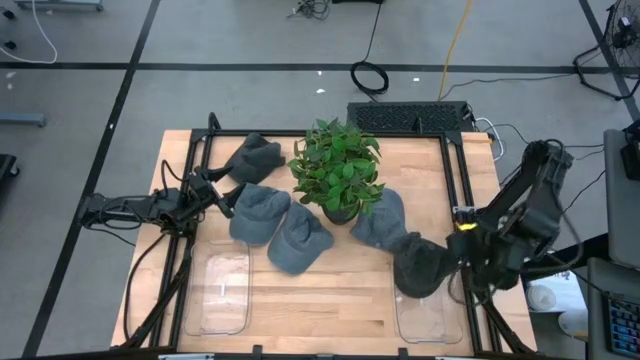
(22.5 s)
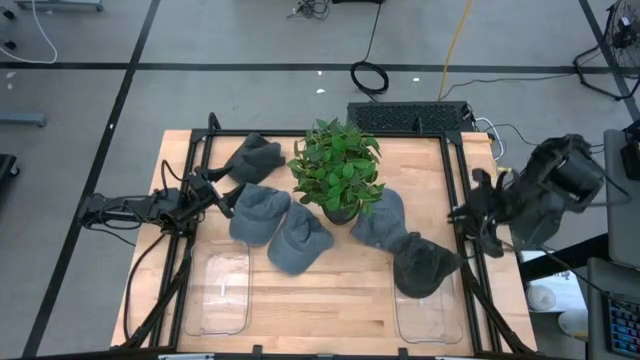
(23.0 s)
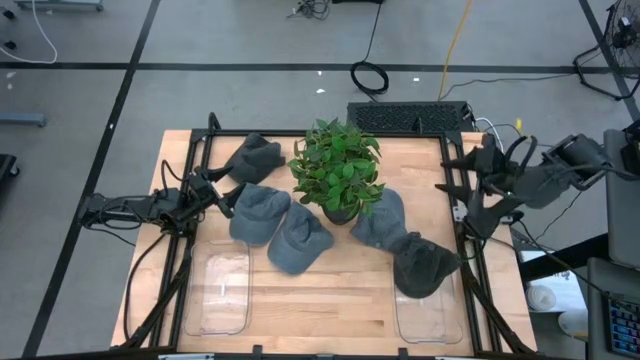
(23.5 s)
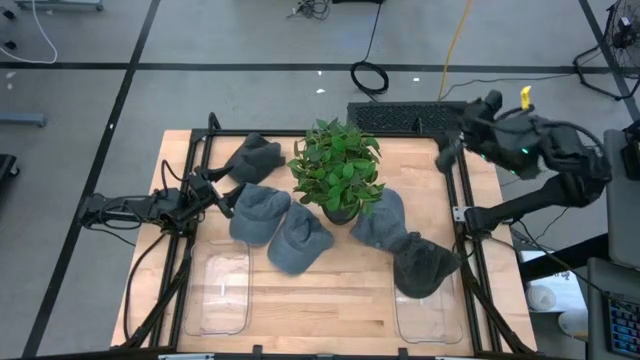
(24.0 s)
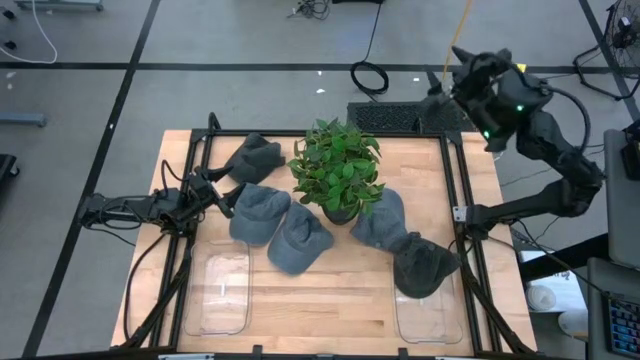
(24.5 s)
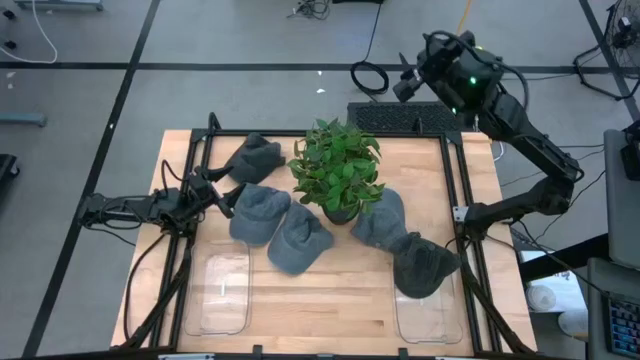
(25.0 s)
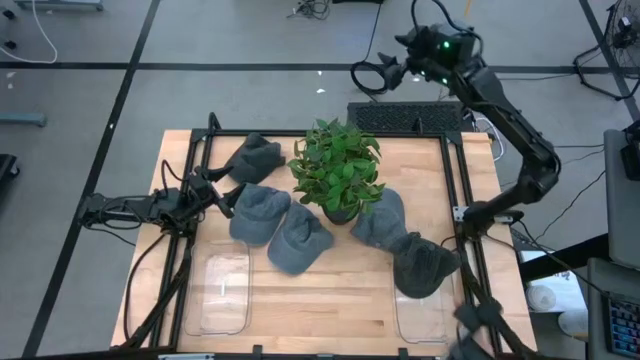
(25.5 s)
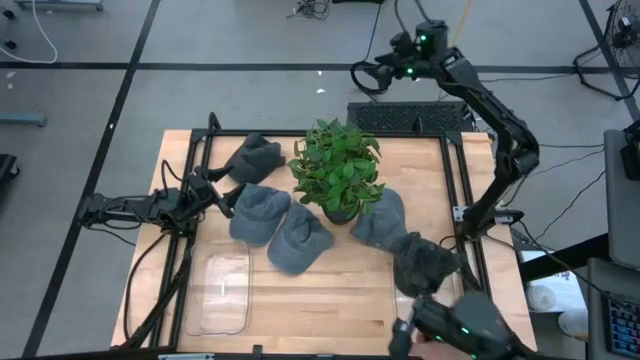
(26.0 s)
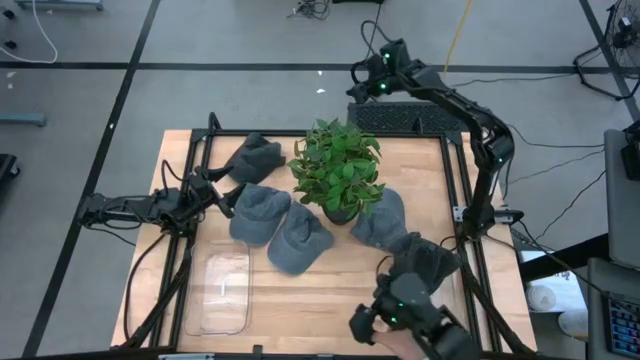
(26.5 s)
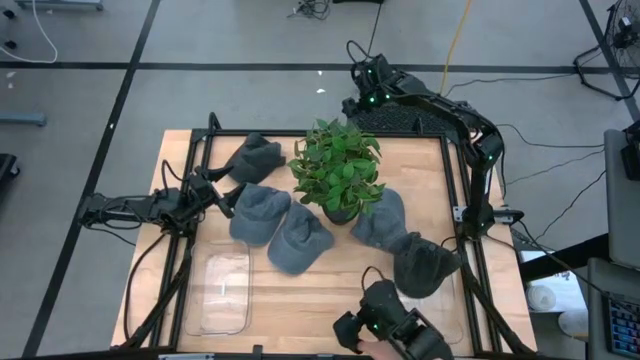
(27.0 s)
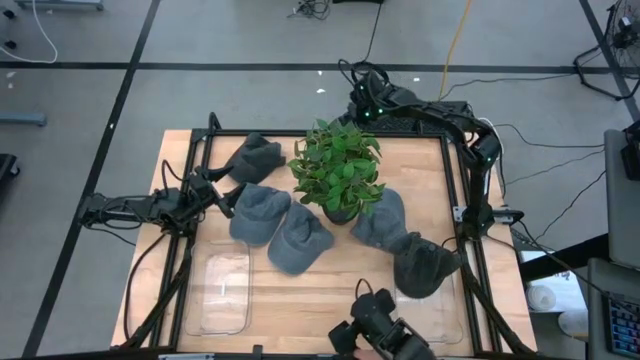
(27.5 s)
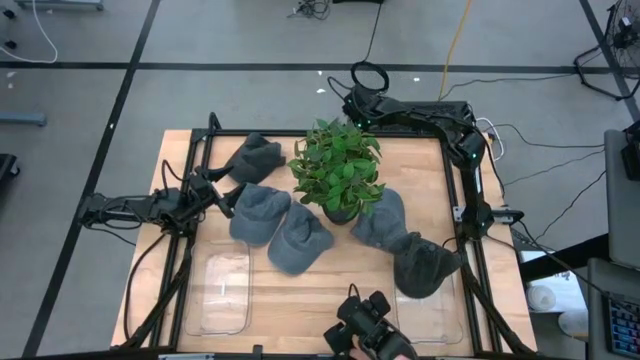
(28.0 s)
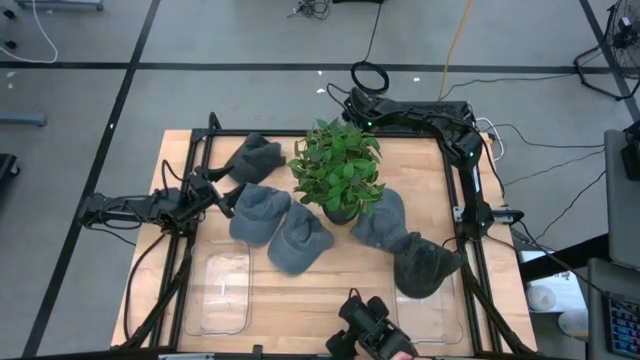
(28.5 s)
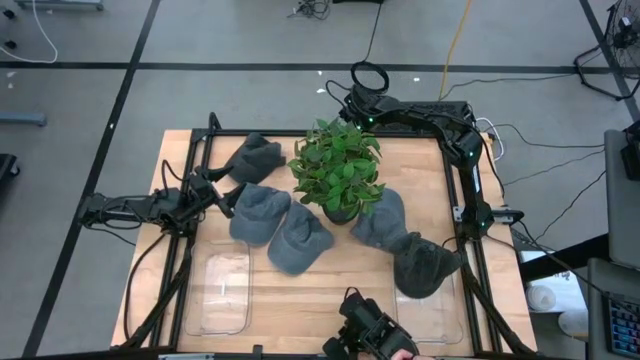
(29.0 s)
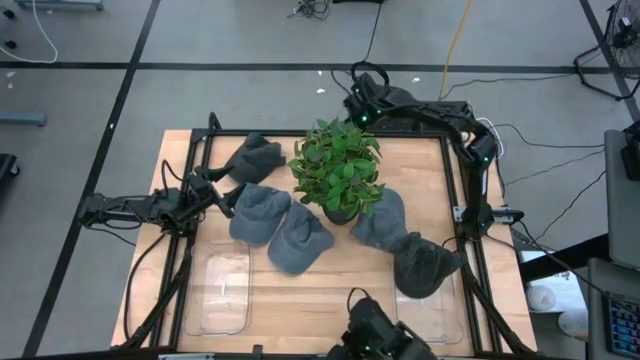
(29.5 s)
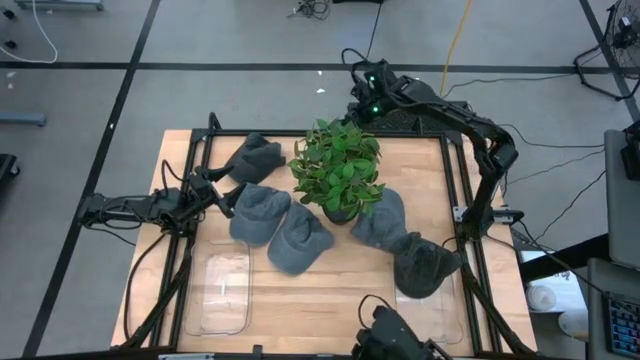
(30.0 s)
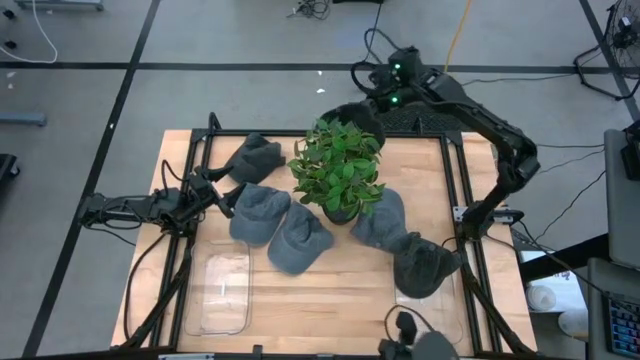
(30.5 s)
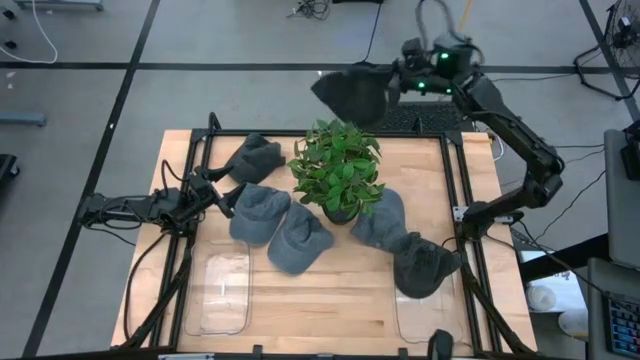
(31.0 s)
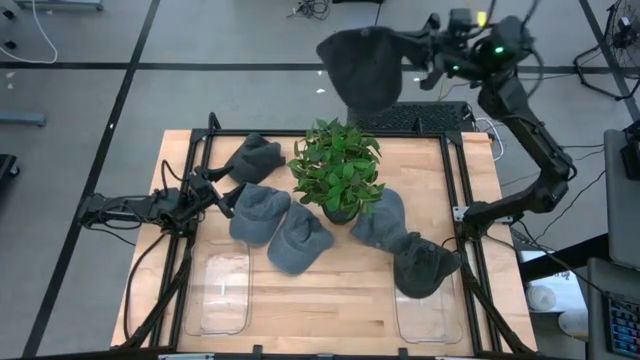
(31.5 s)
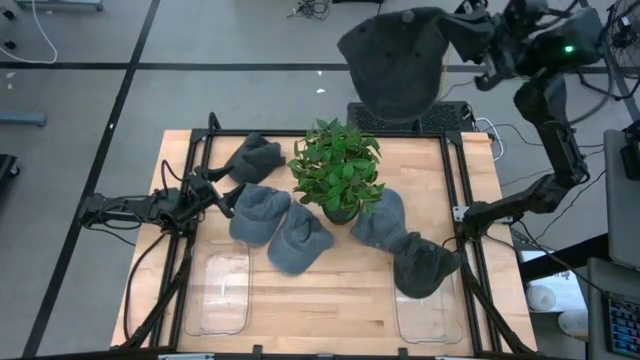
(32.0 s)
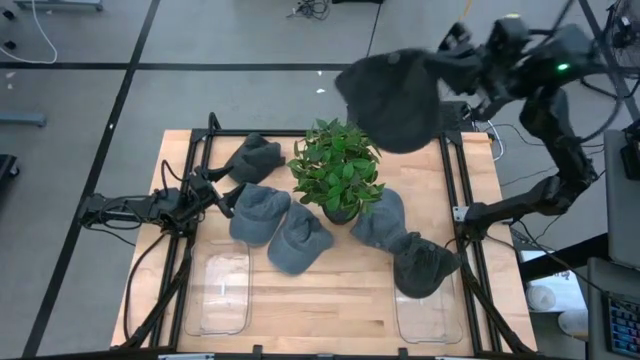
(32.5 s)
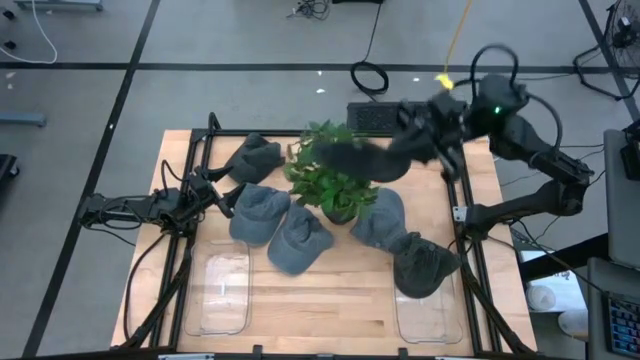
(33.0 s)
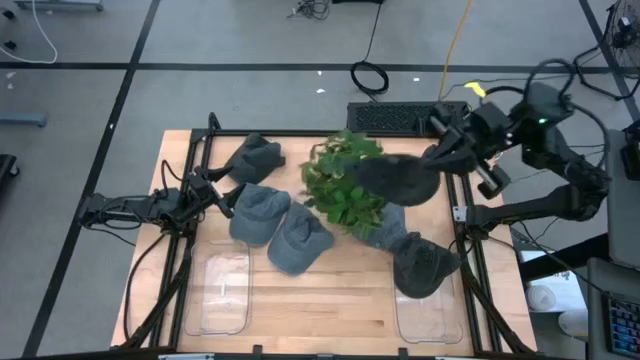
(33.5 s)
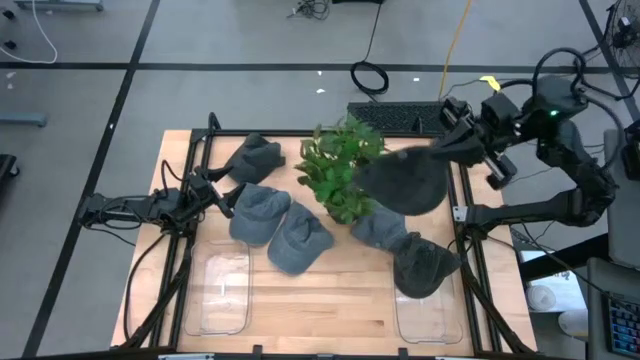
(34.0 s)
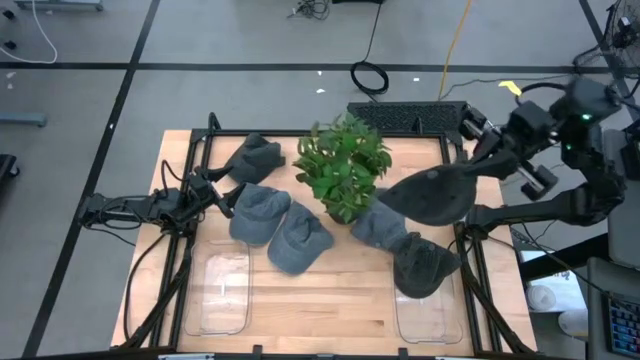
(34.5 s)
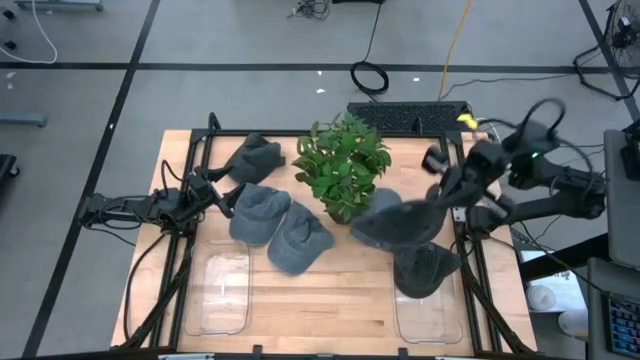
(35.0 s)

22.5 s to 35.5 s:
Task: Pick & Place hat
Put the right black cap into the right transparent bin
